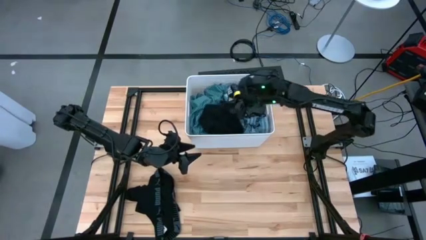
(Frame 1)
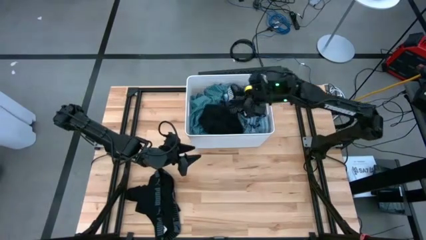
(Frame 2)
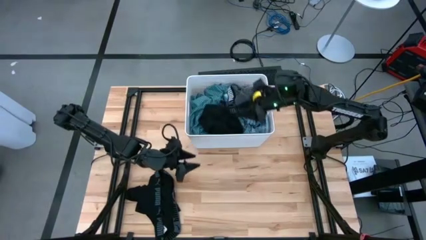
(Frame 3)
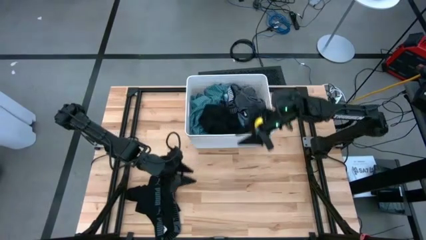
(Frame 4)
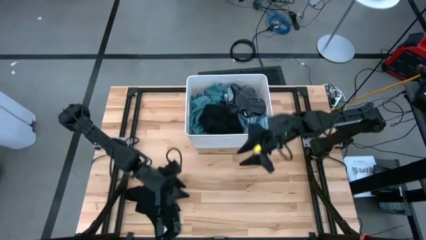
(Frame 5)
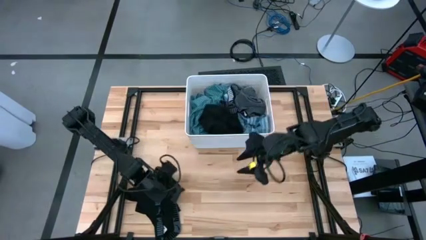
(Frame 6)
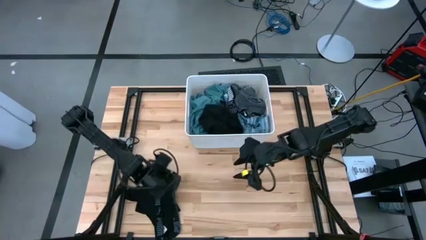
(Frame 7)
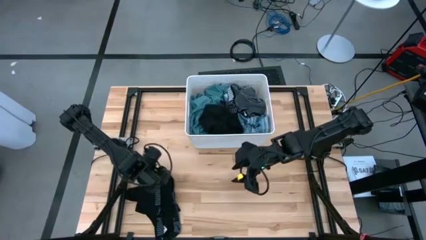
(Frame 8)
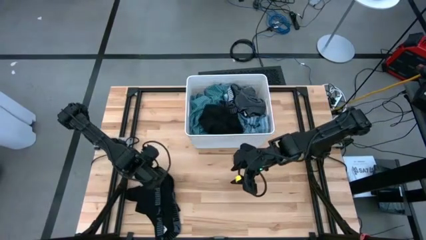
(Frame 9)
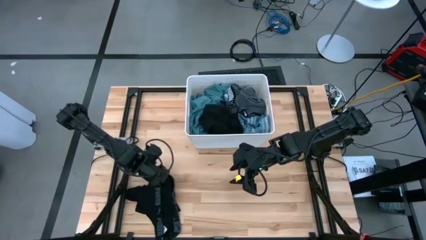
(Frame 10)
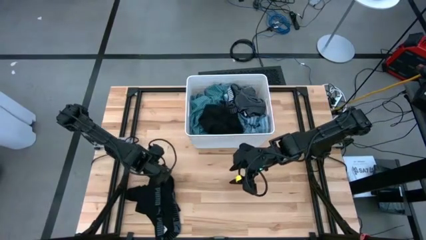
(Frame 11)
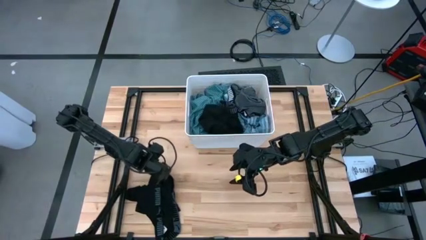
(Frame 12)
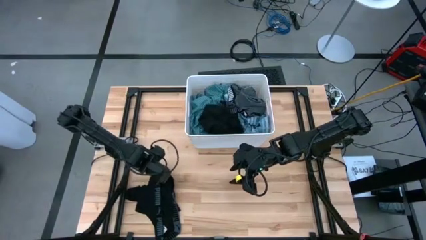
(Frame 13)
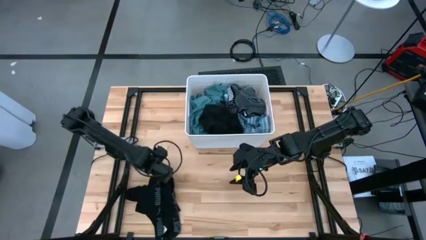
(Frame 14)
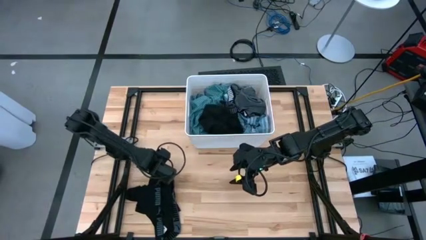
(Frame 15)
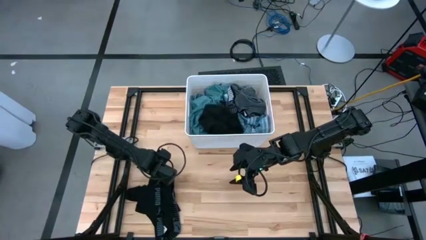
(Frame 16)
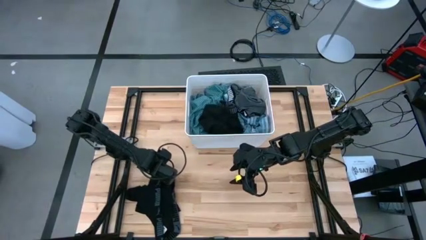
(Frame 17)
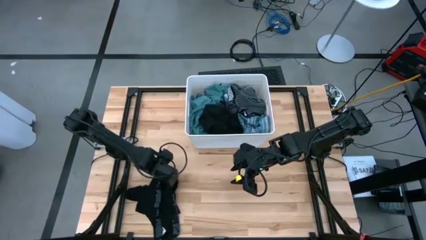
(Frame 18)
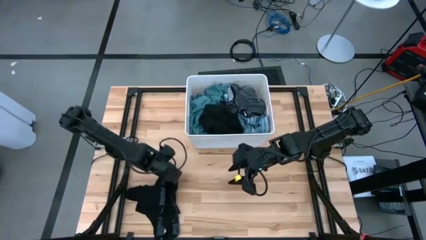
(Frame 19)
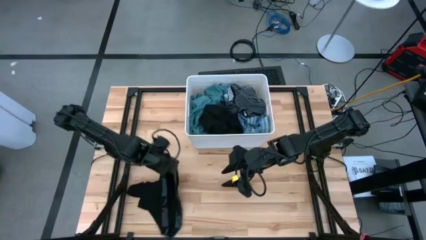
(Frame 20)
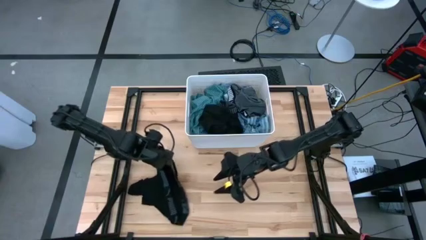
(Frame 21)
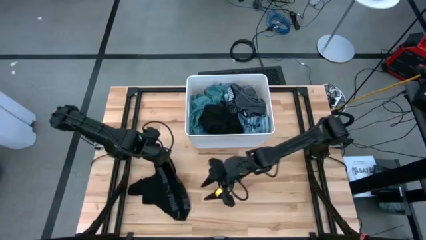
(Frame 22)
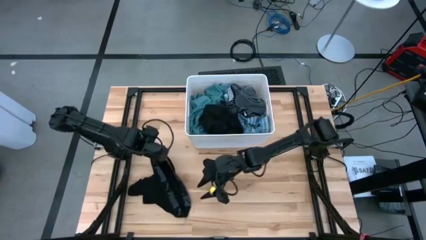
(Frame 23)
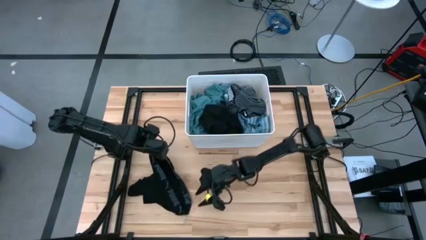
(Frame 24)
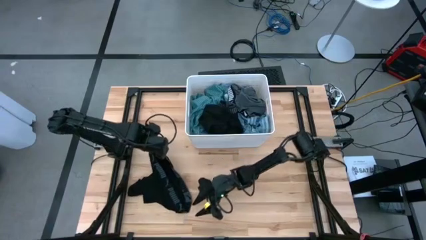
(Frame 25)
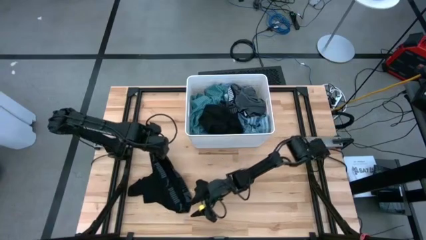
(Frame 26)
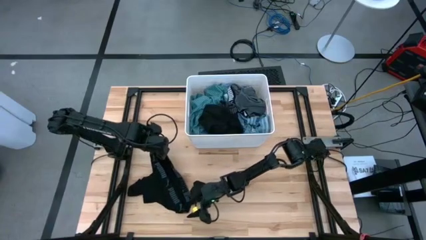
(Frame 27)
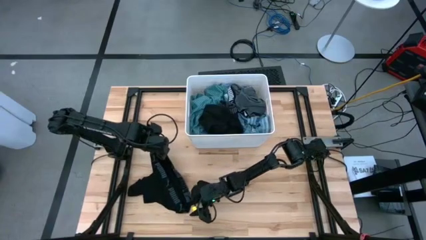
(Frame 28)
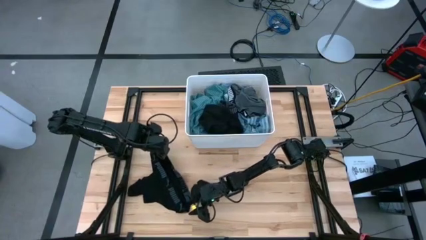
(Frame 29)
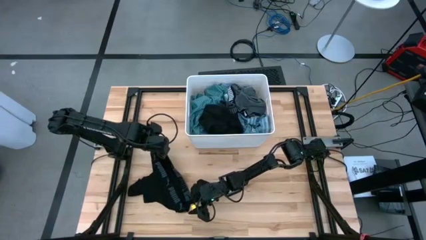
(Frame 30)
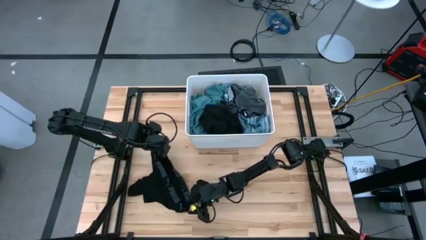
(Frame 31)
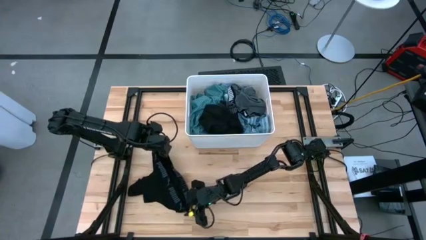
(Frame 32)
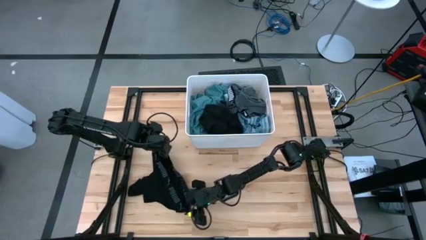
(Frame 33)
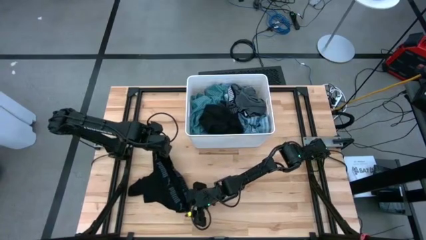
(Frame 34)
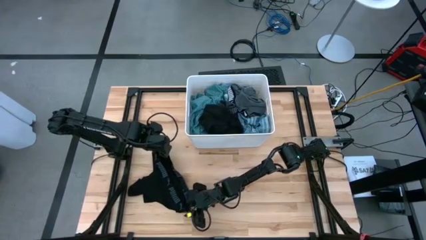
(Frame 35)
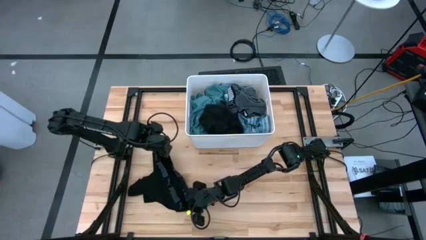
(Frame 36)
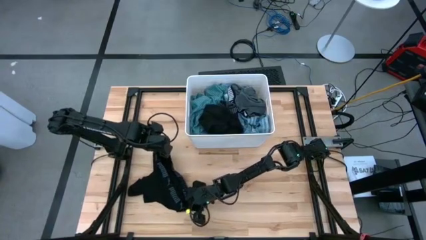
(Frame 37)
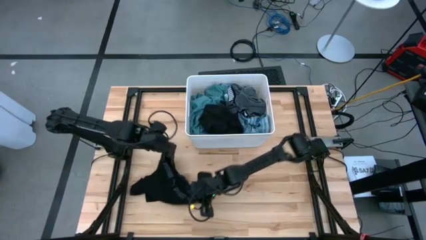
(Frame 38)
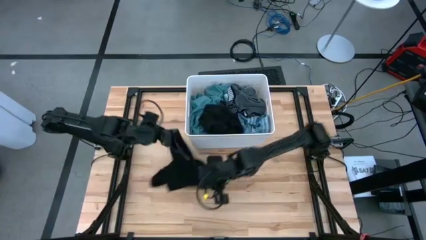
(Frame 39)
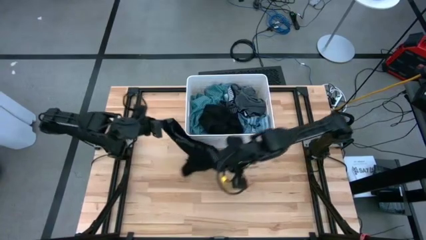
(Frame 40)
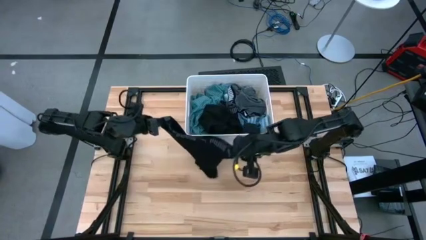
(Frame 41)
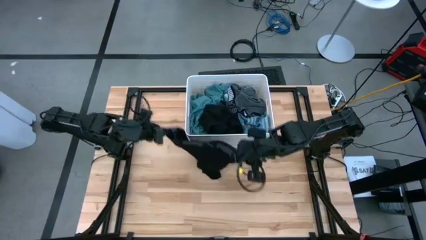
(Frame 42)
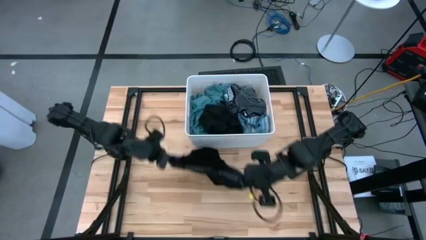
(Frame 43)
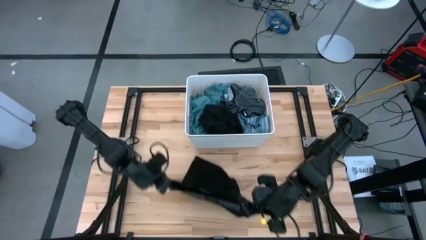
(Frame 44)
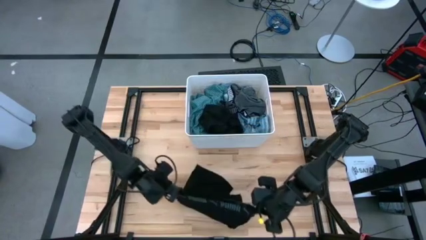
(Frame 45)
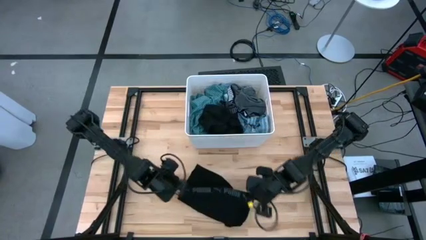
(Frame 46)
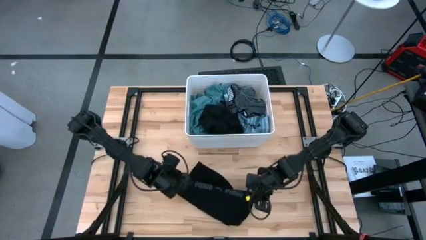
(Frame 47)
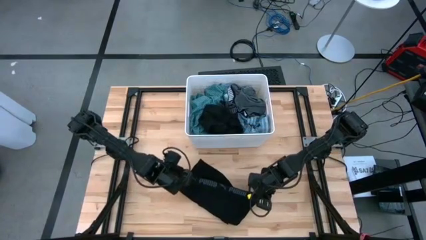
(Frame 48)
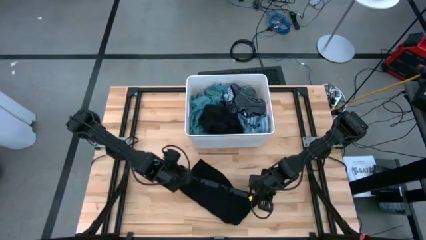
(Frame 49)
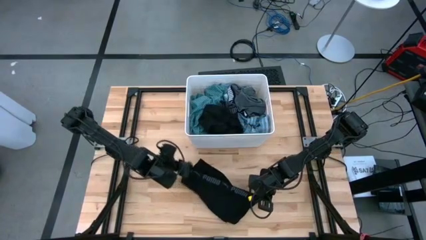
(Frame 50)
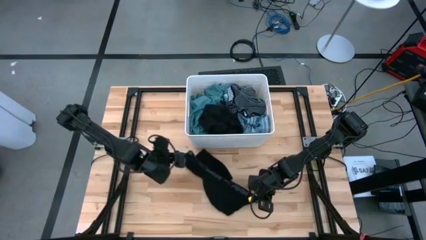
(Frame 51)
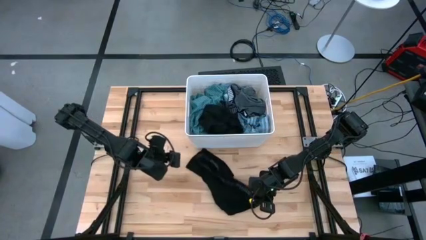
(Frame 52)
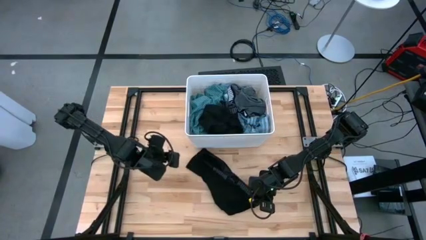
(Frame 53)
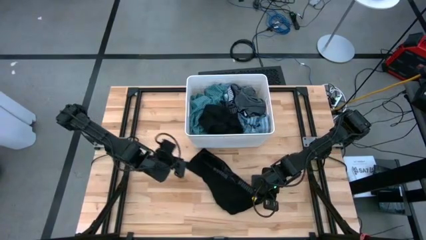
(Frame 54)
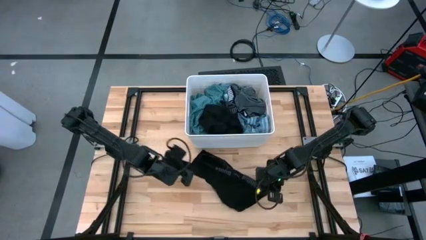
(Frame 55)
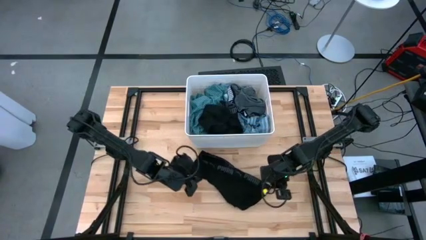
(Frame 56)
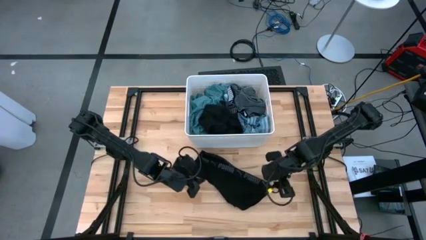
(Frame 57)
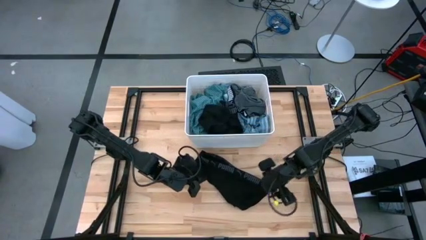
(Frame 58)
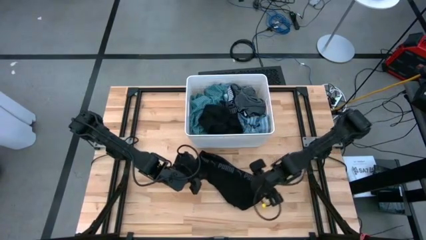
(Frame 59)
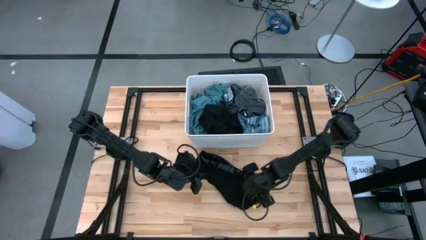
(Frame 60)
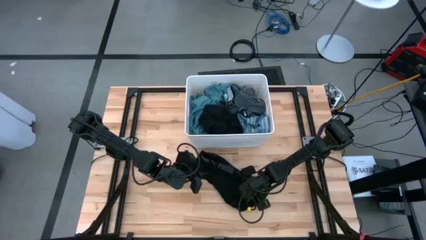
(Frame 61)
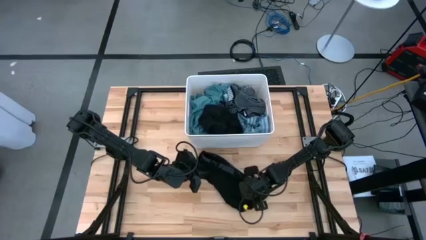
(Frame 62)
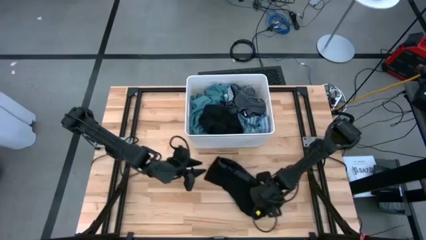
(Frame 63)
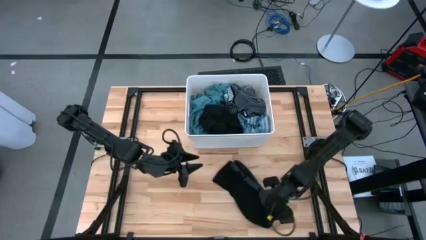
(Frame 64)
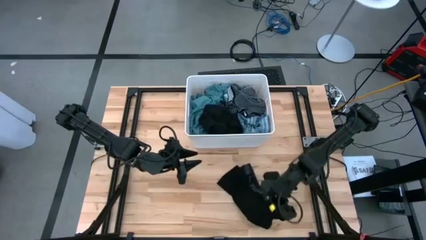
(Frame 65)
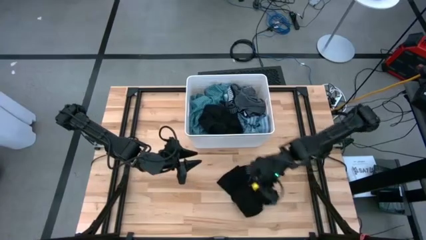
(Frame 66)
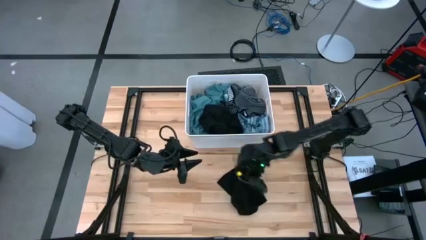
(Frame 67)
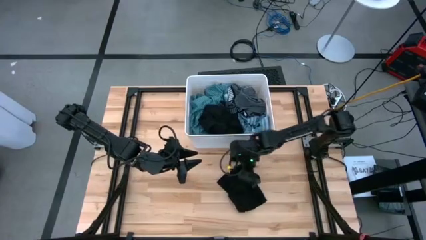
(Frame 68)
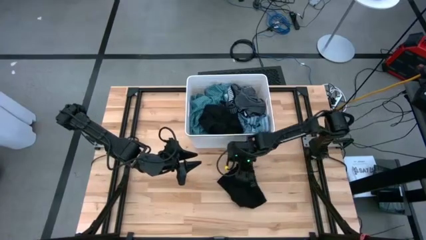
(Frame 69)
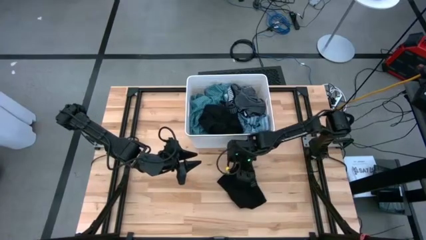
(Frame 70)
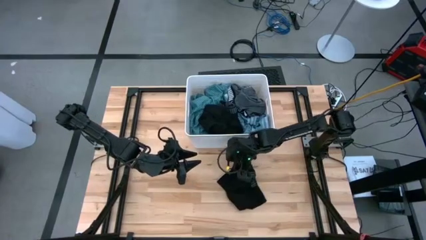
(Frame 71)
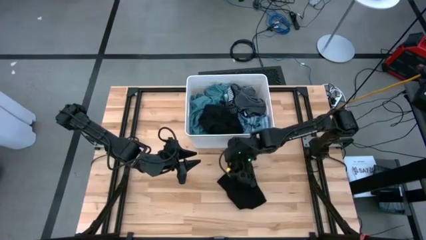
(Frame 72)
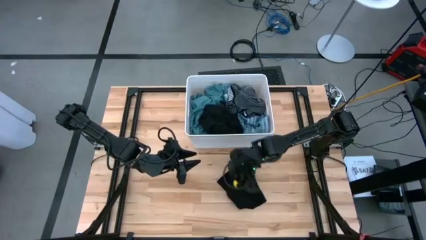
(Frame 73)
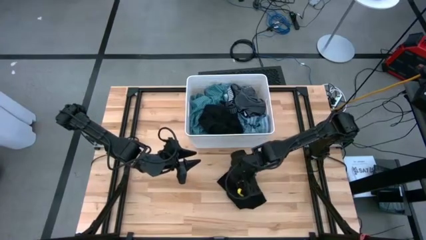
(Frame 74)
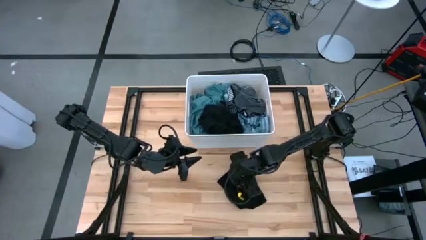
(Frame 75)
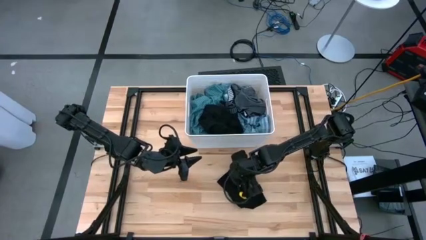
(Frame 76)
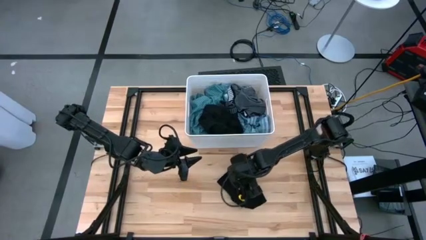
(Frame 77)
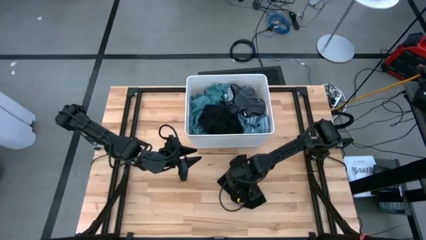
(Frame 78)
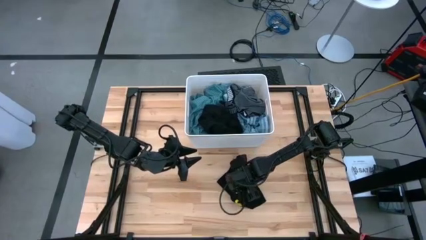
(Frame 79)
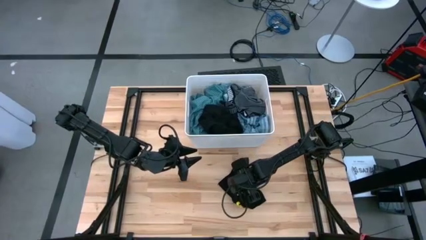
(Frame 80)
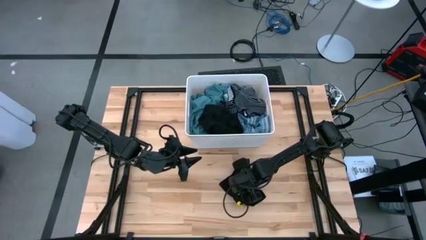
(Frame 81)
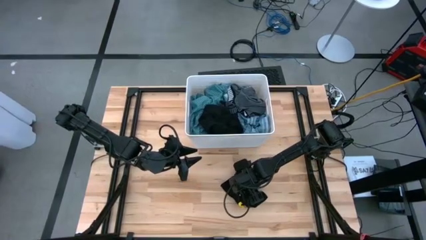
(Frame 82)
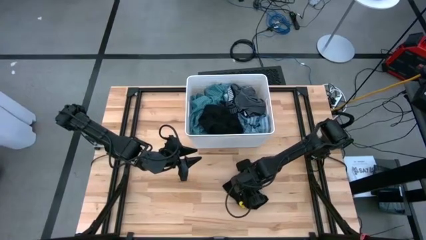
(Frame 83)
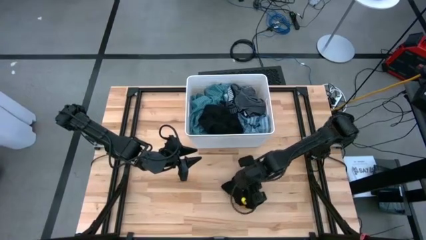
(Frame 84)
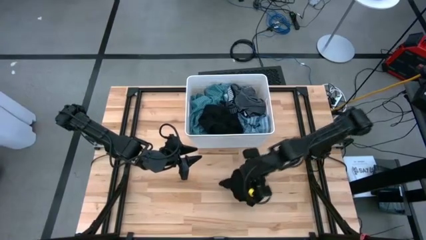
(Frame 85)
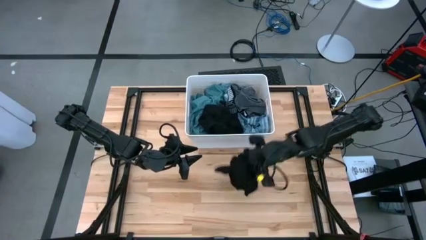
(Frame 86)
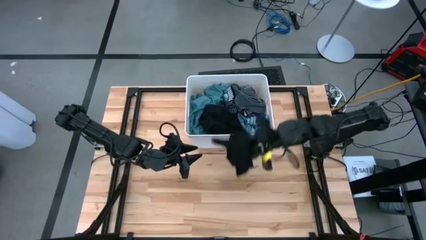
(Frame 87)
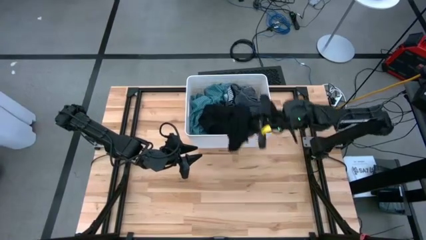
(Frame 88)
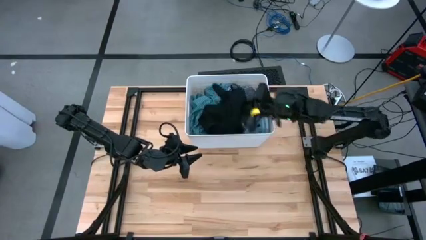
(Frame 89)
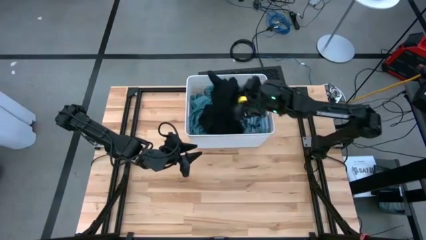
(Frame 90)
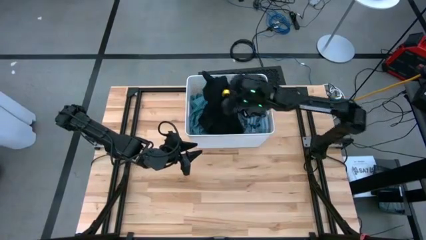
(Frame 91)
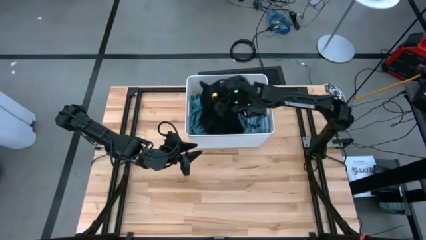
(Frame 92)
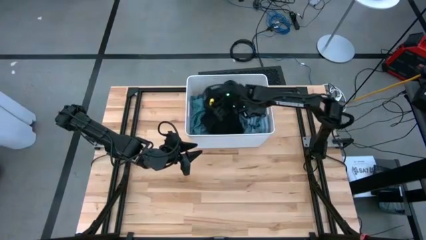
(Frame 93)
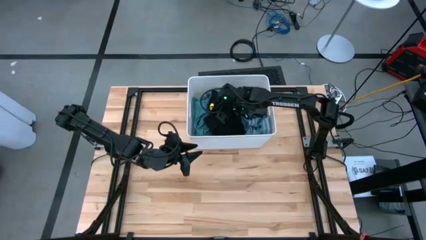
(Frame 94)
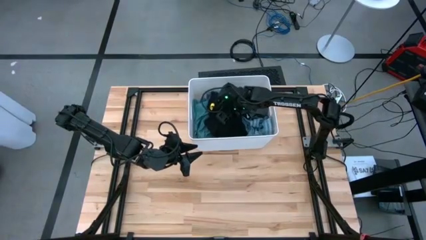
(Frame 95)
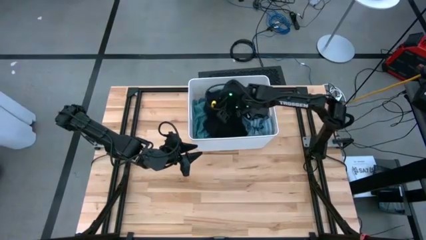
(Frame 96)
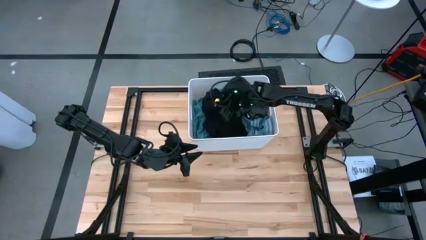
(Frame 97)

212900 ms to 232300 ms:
Task: Sort clothes
Put the black underwear into the white laundry organizer
